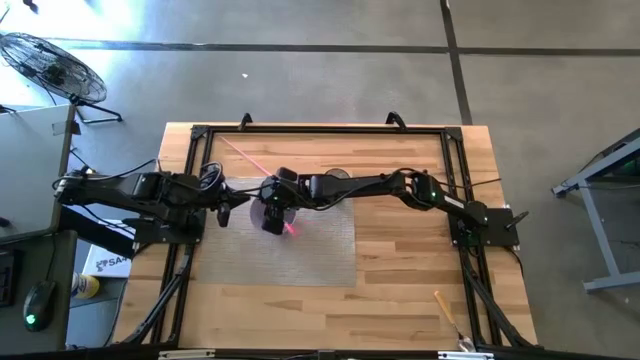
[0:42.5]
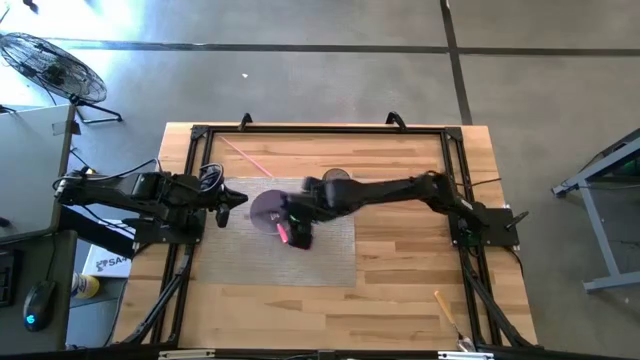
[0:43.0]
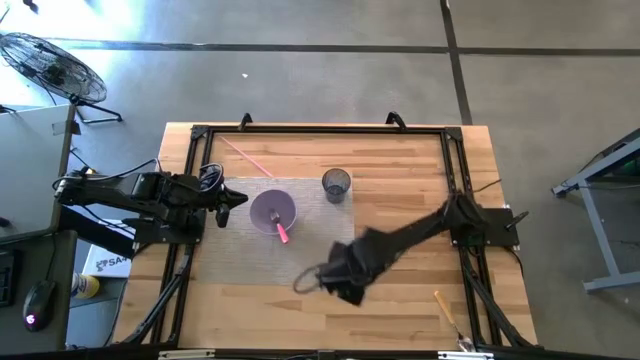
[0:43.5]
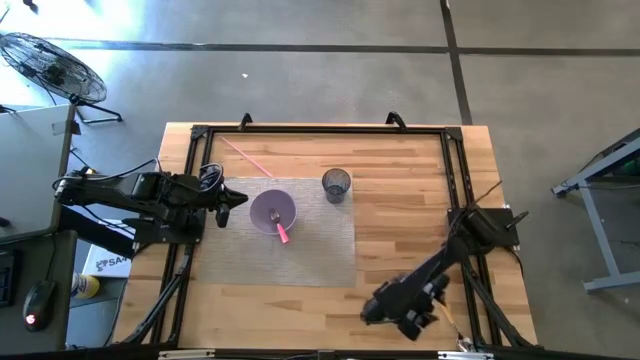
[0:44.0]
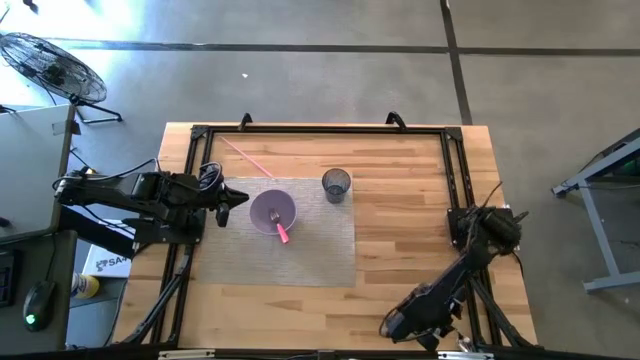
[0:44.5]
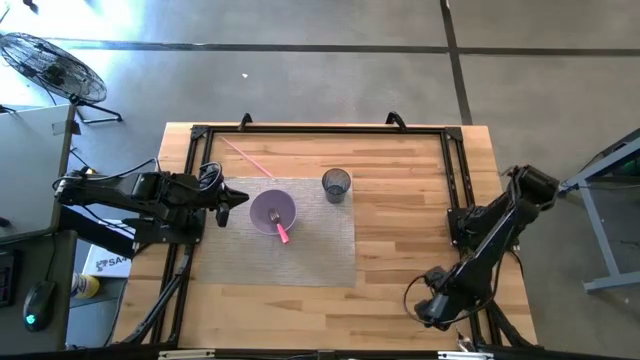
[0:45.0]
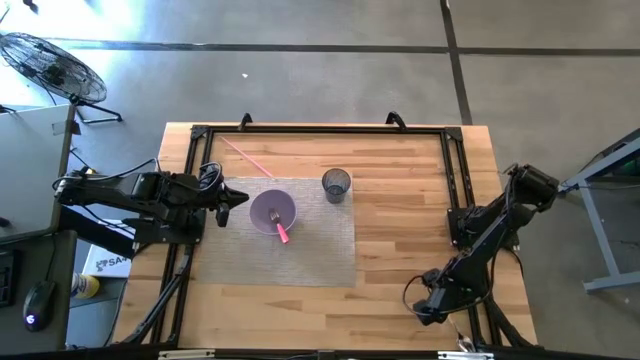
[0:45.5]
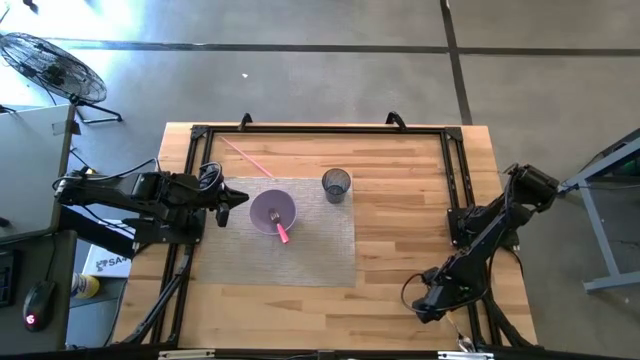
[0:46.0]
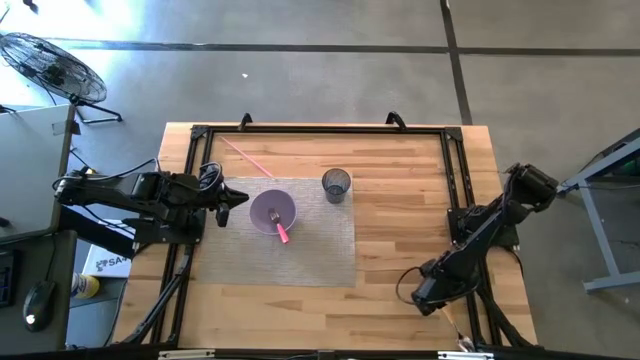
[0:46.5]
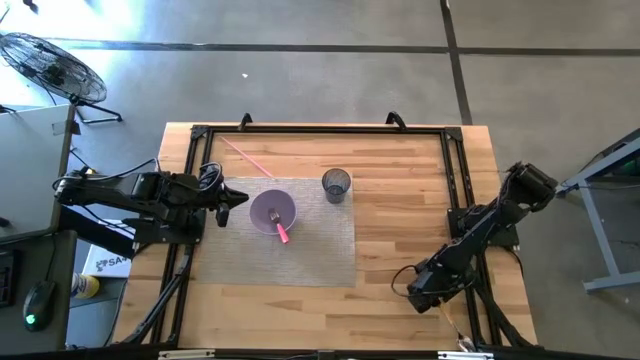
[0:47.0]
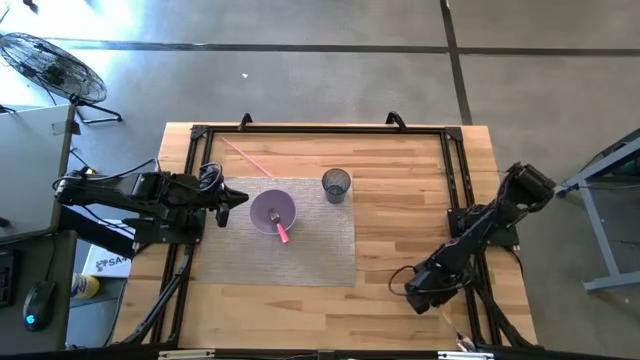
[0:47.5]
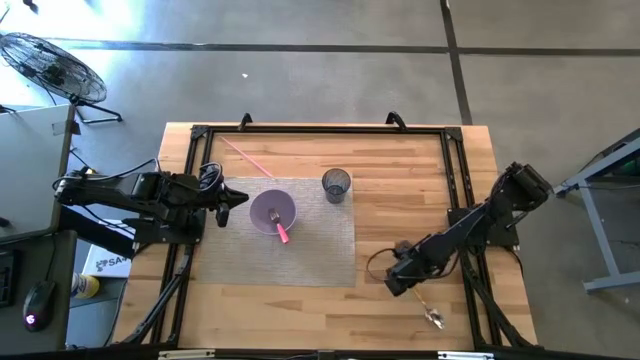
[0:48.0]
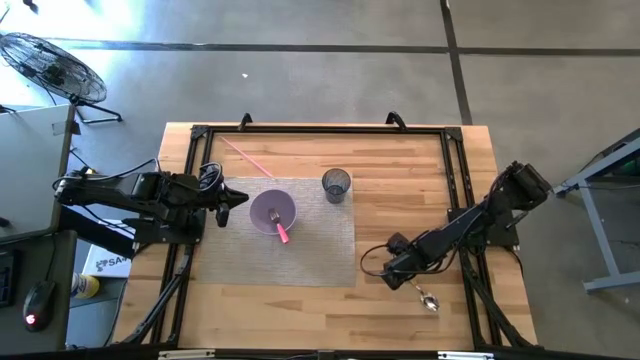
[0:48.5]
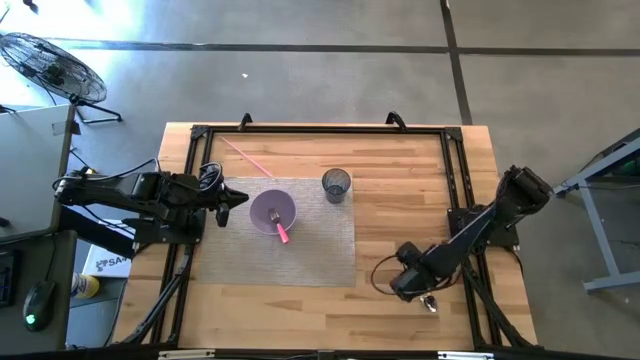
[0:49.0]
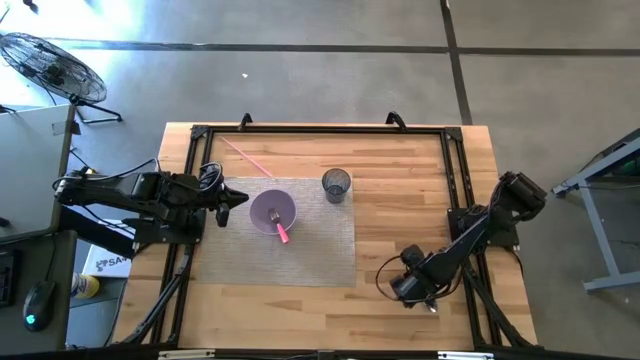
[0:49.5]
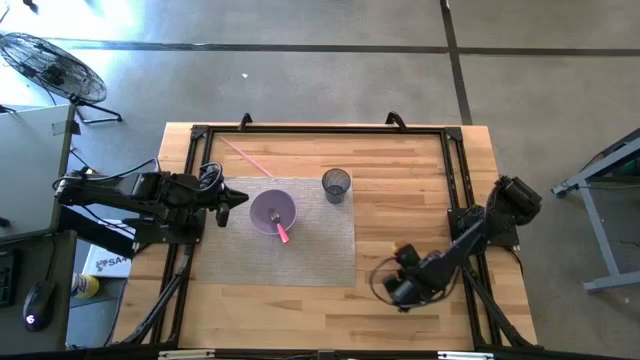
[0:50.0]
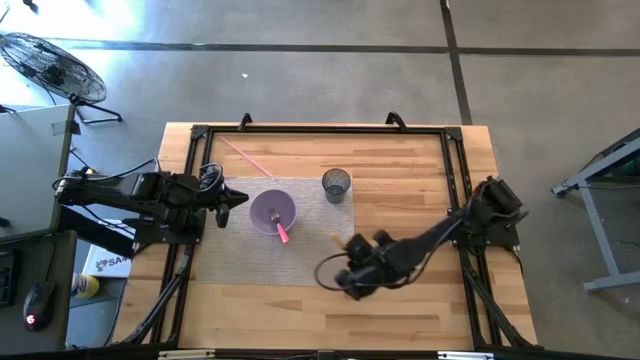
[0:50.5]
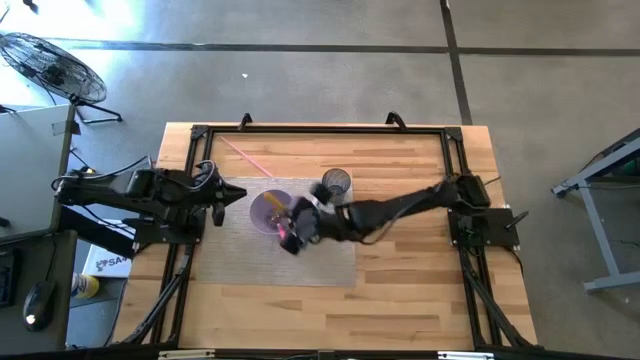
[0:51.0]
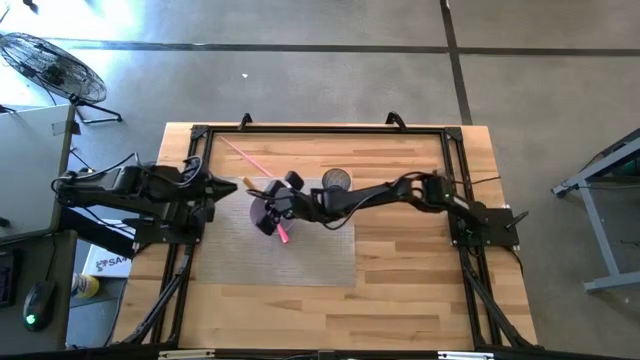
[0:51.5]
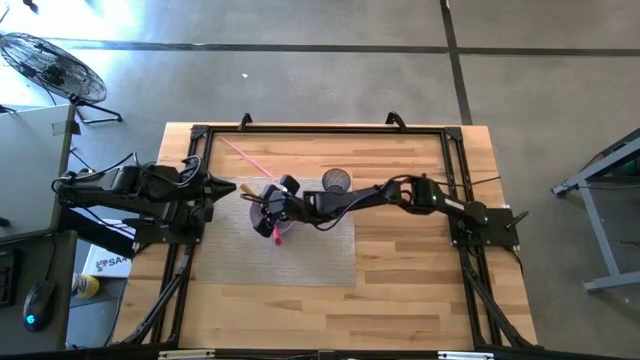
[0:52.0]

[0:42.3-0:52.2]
Task: Pick & Place Utensil
Put the yellow spoon into the purple bowl

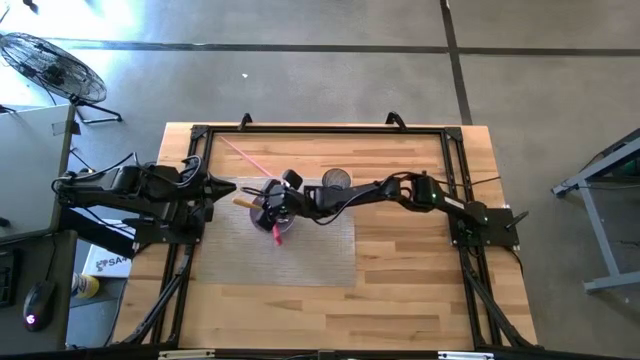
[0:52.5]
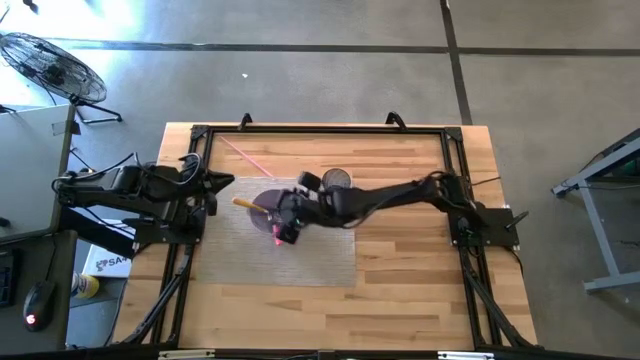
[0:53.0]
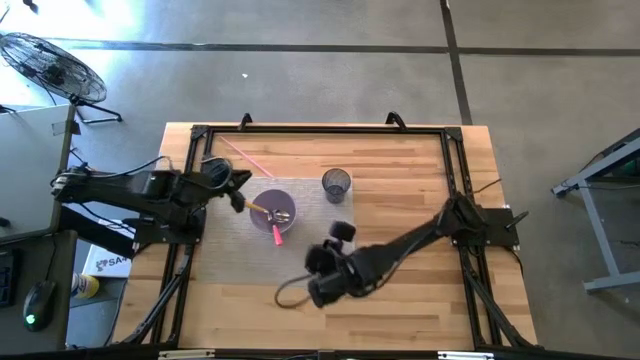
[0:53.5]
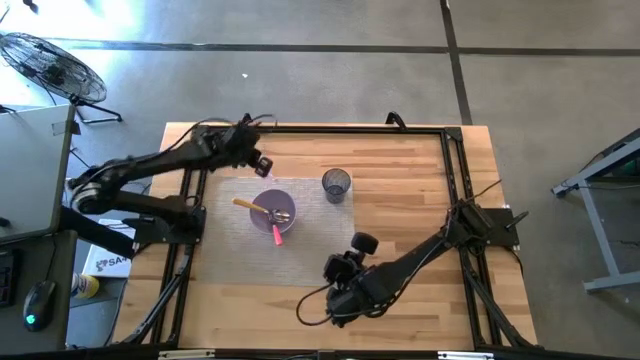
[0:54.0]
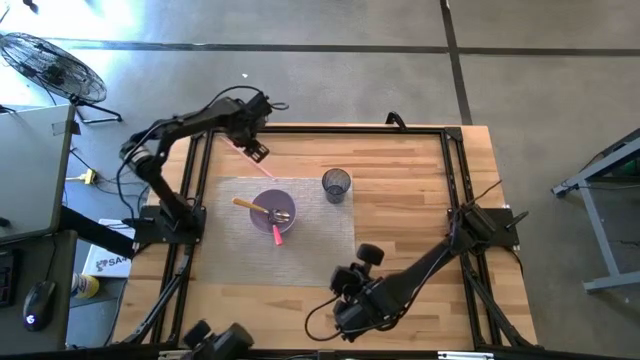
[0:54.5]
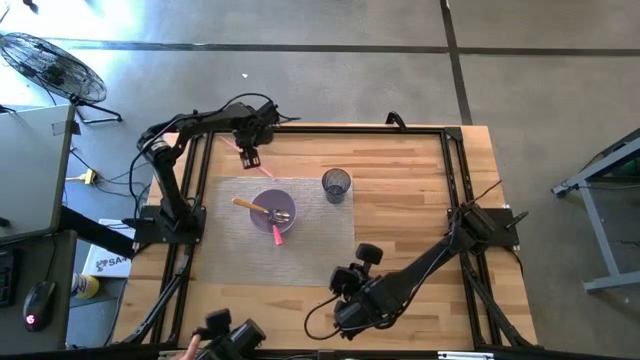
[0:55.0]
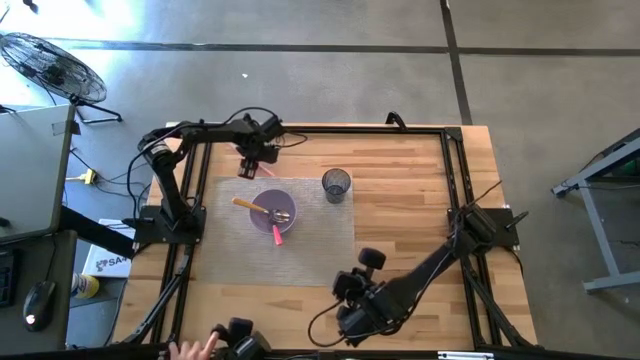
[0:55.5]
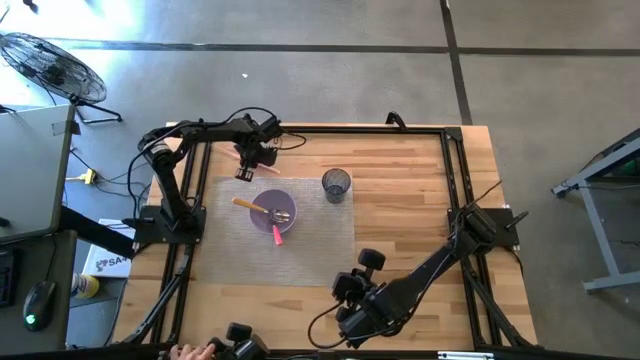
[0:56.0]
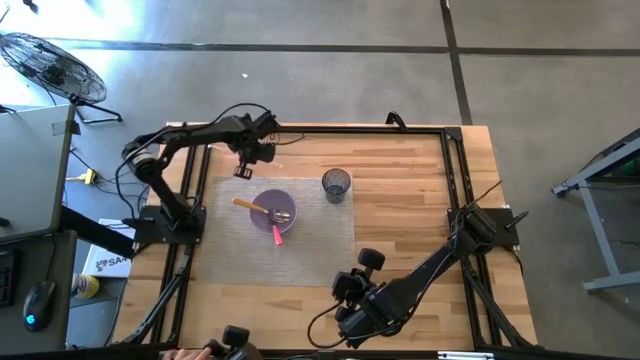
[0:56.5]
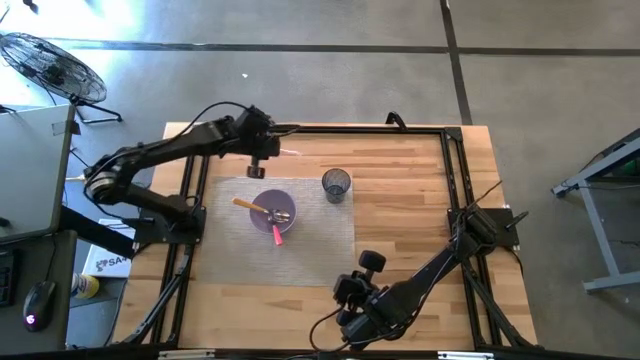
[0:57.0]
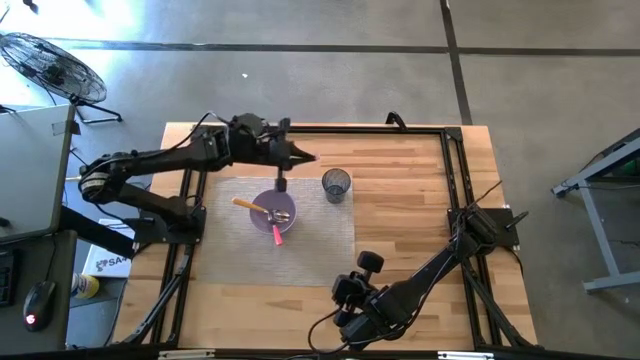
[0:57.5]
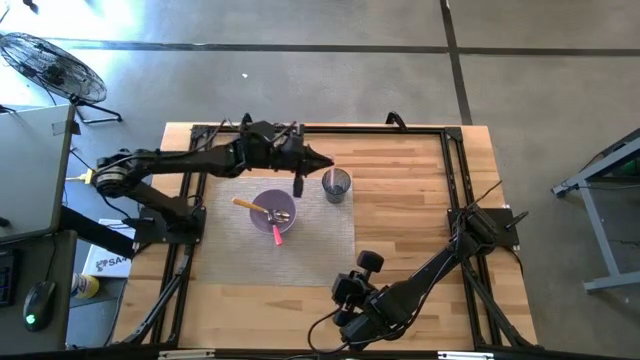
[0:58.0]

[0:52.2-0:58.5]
Put the pink straw into the blue glass

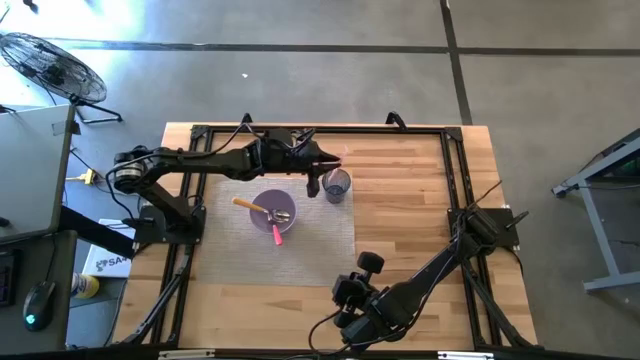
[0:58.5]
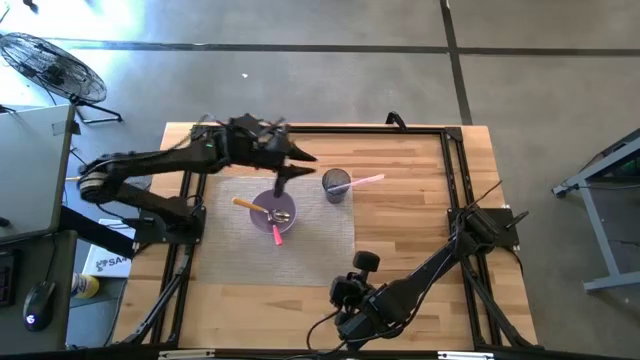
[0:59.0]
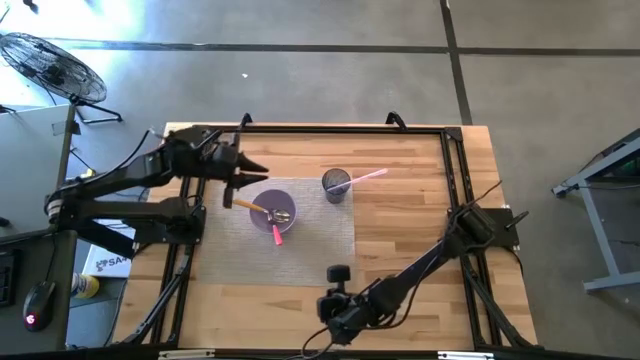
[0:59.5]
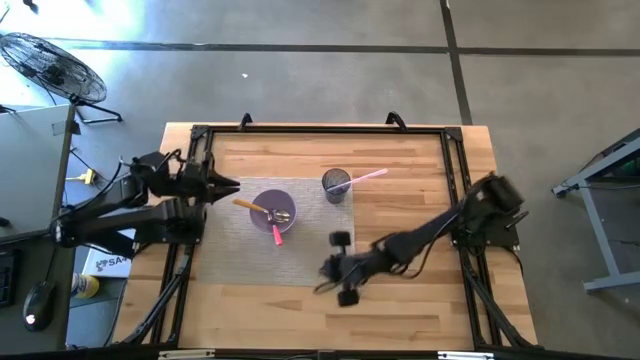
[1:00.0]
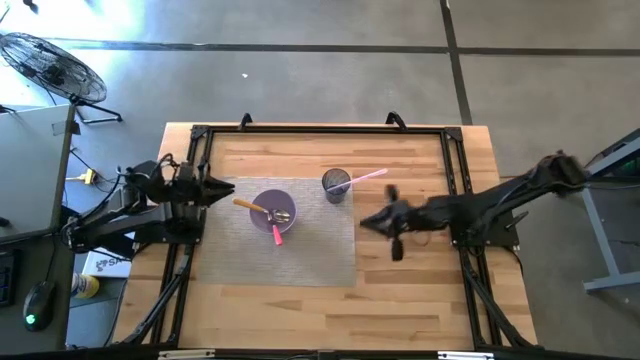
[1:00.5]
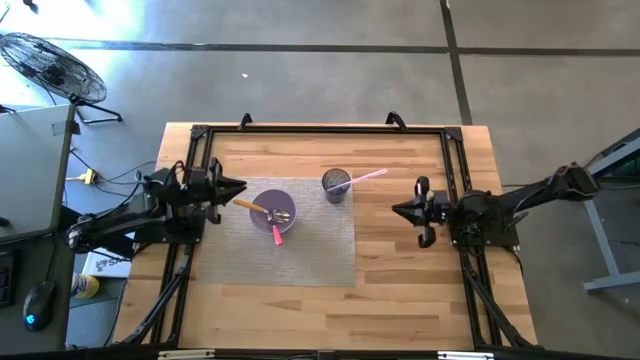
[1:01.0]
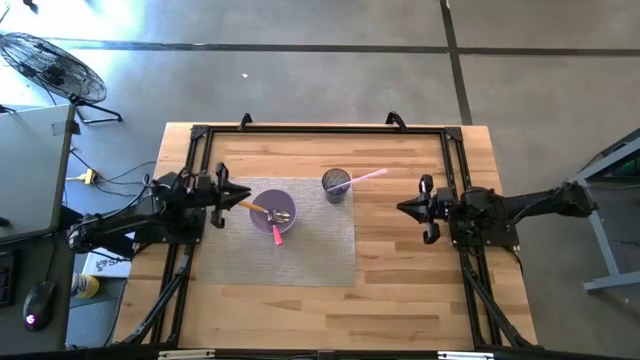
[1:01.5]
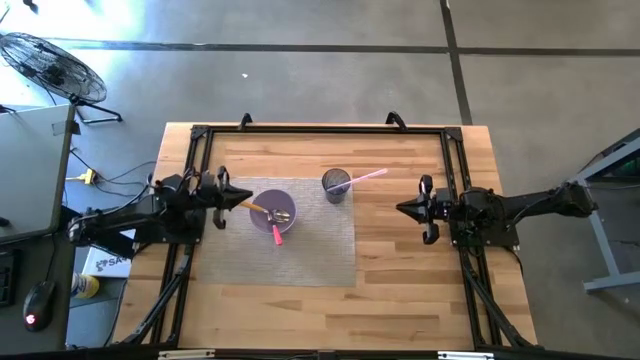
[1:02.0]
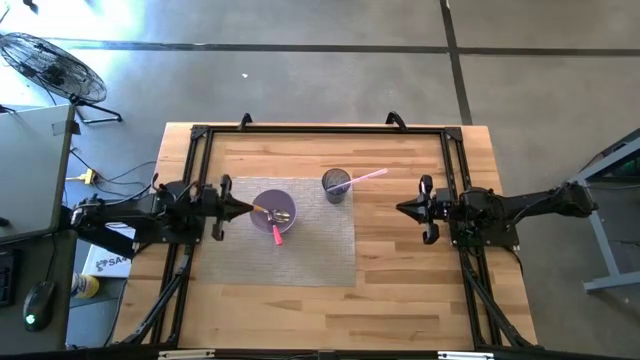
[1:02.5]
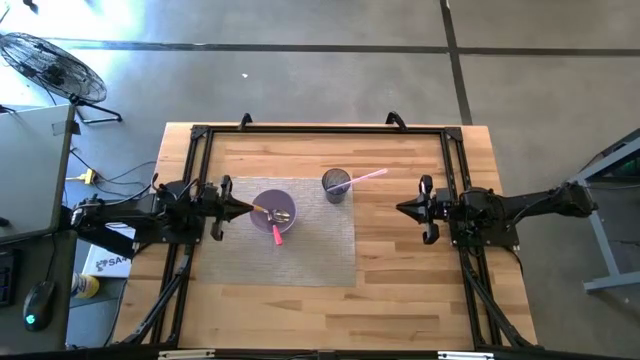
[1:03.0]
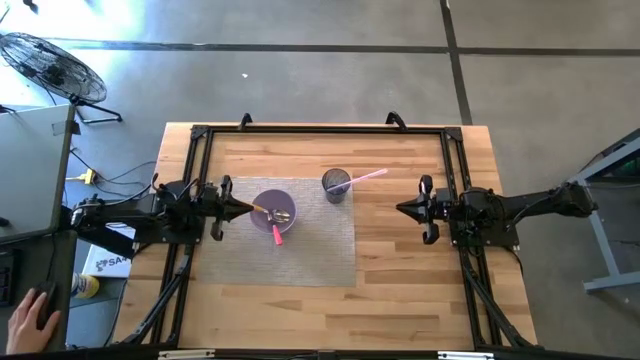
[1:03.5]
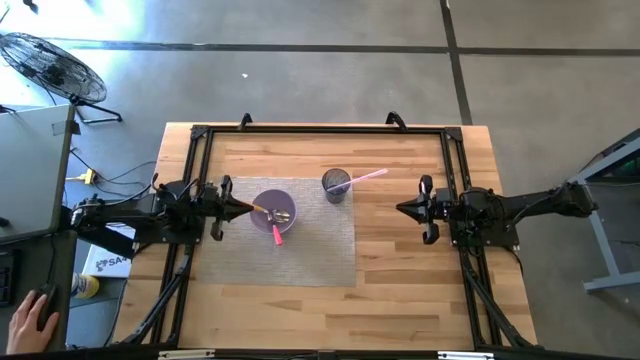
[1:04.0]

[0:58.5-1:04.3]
Return to Home Position
